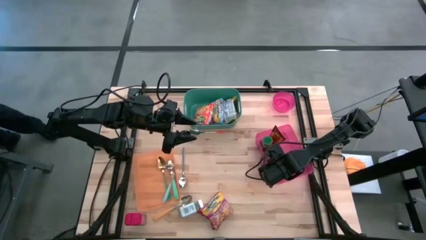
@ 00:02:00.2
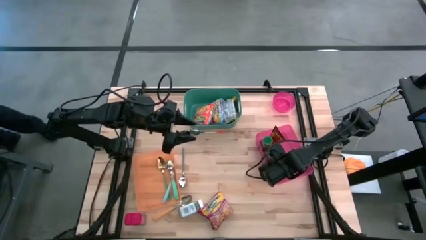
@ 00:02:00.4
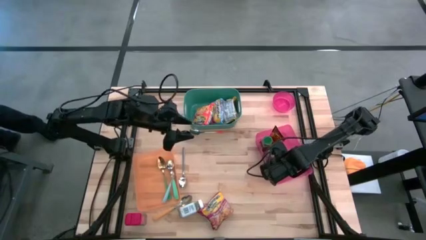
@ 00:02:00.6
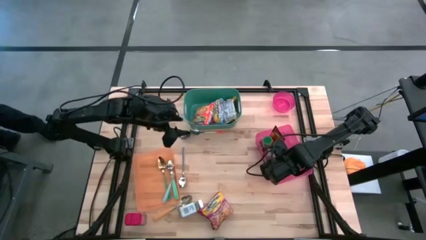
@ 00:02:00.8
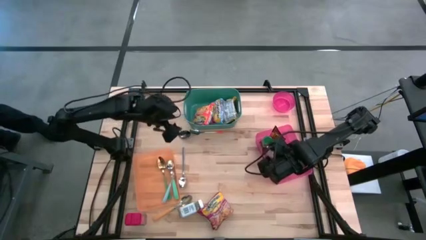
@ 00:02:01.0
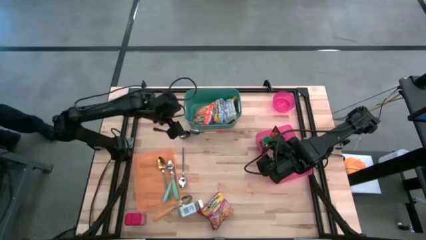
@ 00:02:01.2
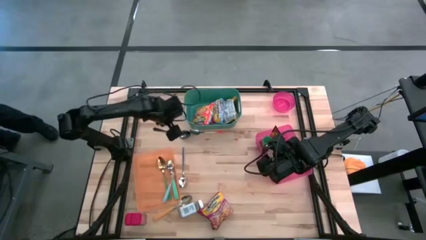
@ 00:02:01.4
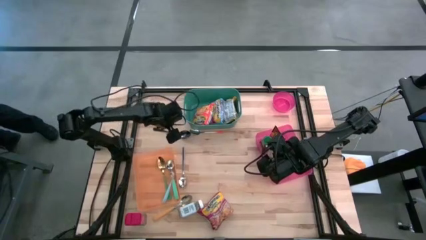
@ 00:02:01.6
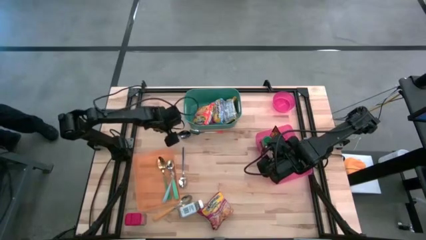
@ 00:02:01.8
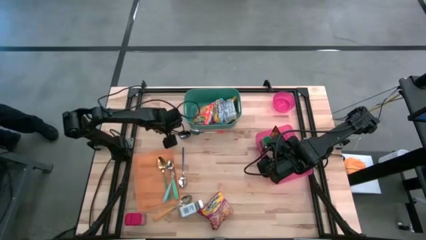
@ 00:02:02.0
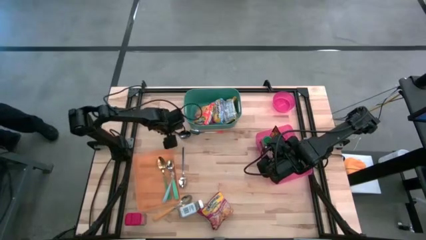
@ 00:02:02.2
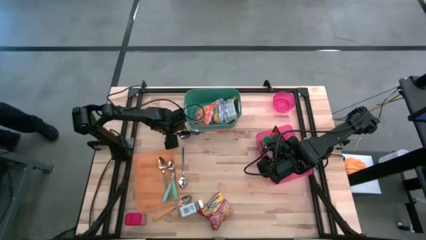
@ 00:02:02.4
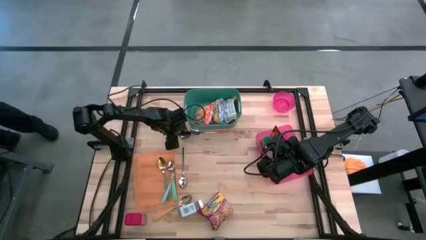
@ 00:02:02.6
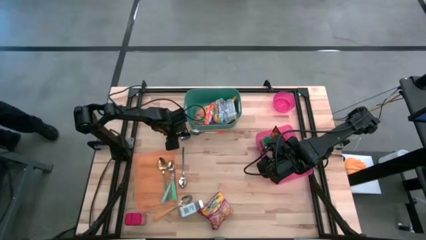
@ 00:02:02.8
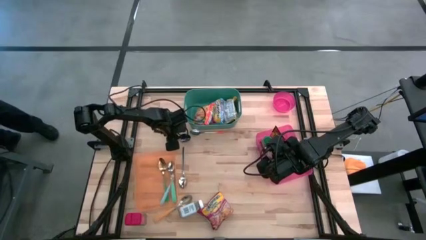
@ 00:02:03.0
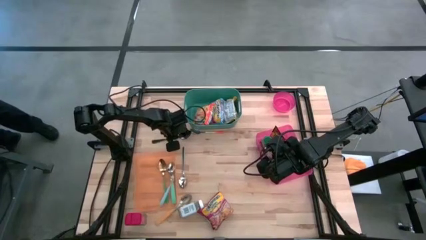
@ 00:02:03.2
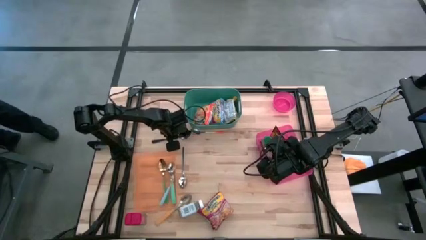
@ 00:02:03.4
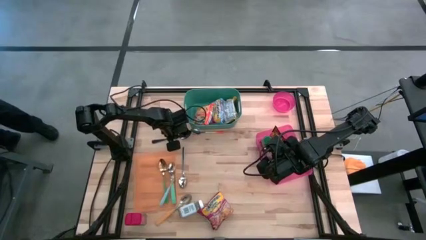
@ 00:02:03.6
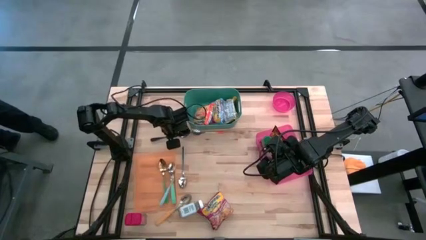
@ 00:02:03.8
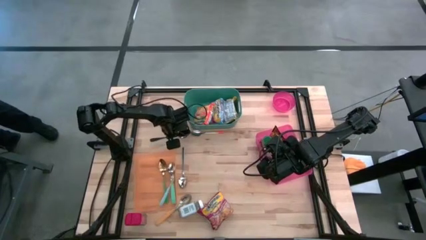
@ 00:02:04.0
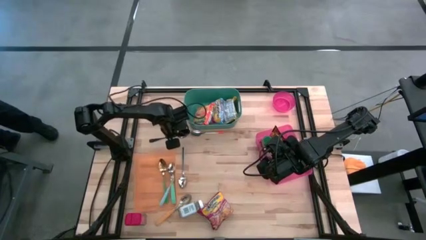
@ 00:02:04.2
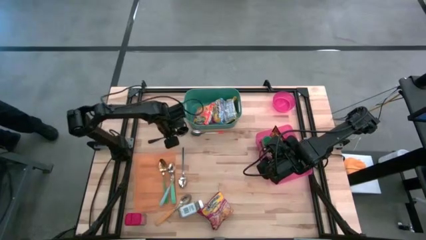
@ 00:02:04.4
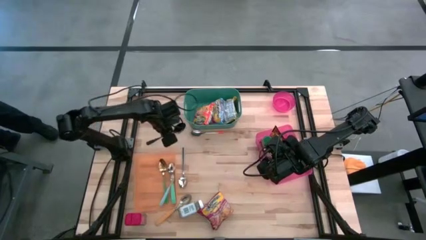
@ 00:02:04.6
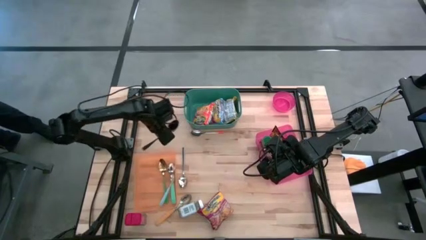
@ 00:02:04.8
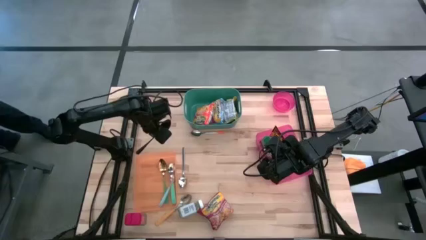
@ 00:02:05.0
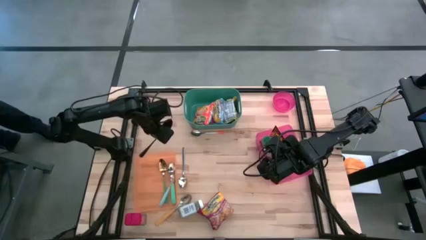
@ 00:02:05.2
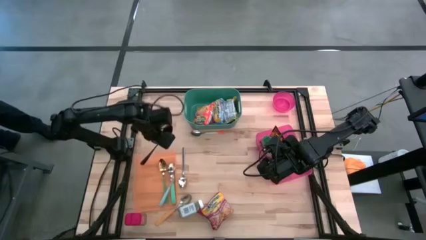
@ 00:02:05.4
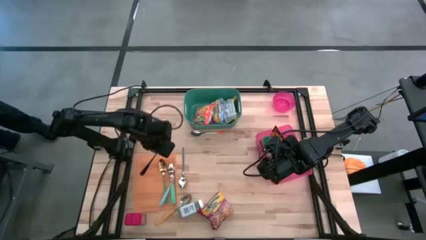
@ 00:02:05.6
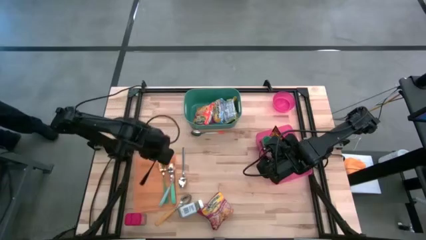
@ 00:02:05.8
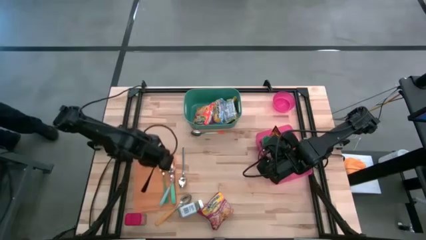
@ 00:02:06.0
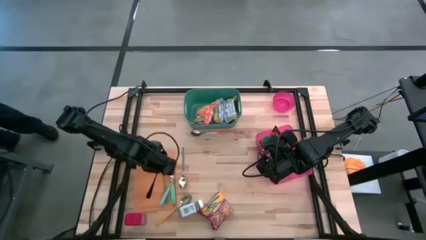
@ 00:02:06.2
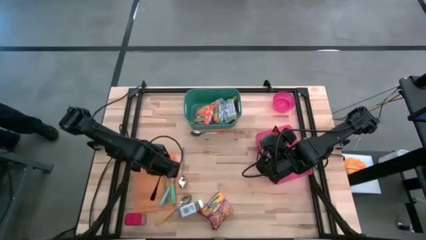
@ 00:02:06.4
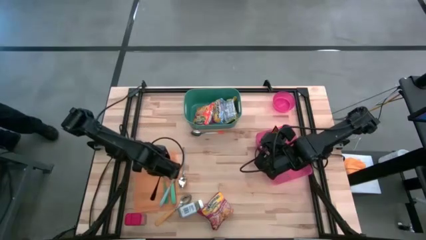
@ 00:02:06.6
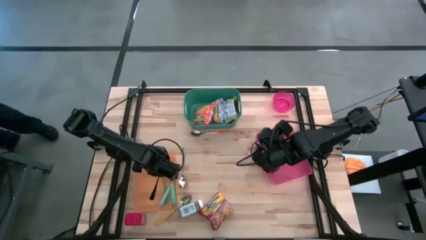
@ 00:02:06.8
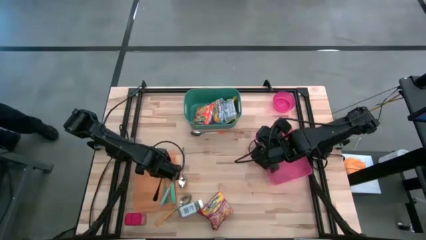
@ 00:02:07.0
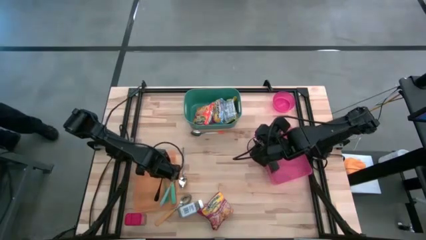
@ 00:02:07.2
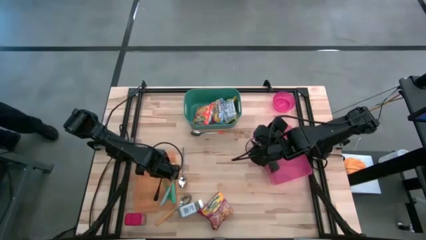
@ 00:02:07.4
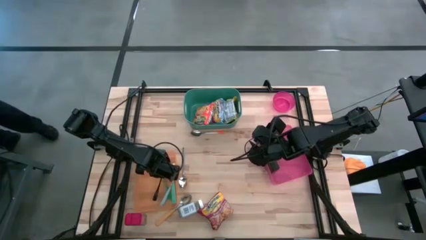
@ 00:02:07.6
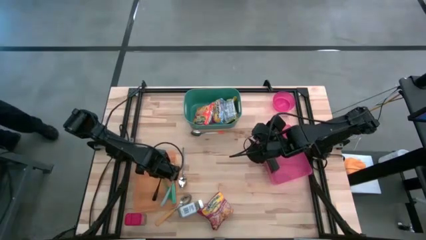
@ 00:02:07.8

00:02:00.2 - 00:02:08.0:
Put the black spoon into the orange bin

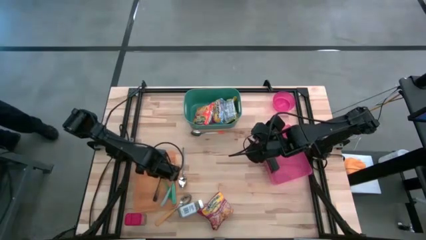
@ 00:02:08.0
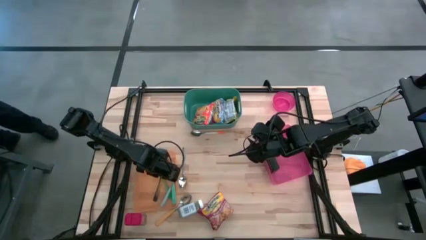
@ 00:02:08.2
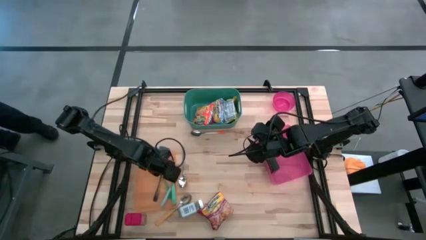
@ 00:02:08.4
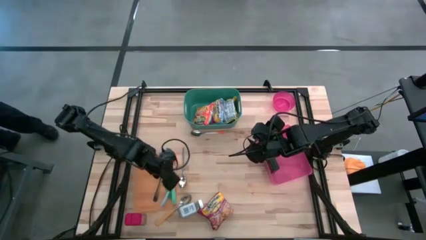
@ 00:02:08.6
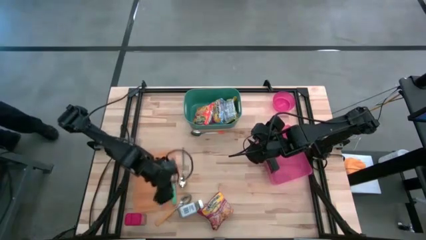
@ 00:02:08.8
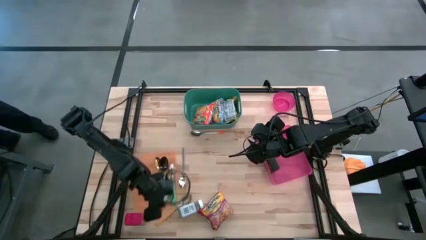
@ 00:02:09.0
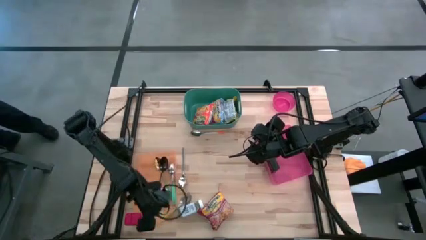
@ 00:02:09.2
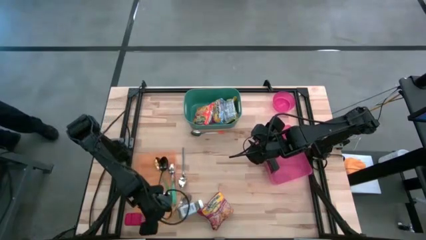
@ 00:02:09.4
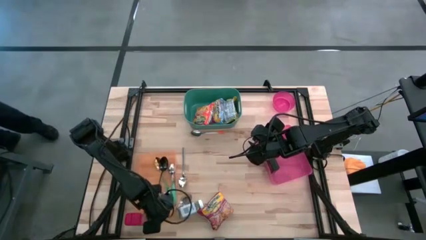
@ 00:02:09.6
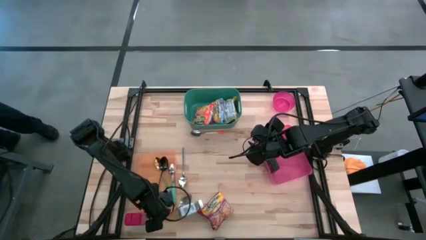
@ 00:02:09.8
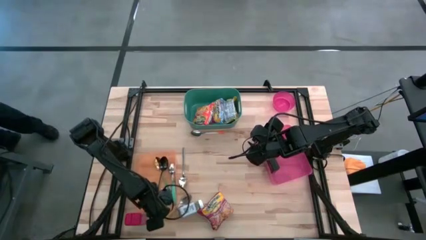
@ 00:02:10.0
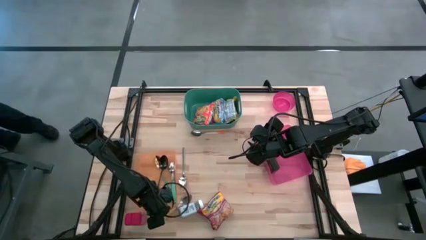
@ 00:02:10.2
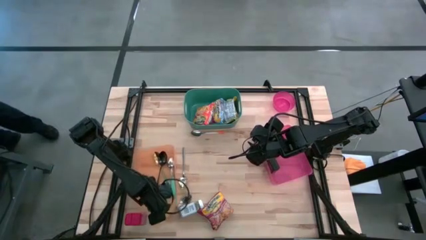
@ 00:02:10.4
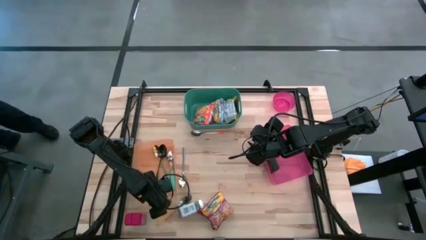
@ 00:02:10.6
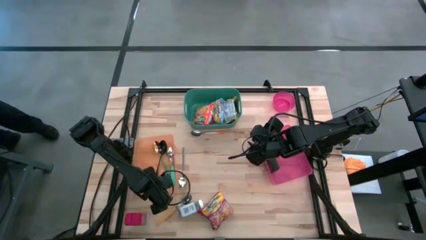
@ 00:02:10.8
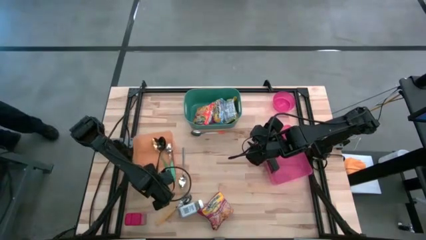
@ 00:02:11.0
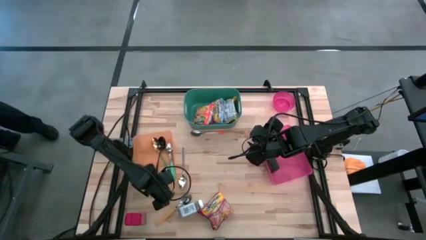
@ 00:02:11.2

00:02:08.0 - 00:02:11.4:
Adjust the orange bin

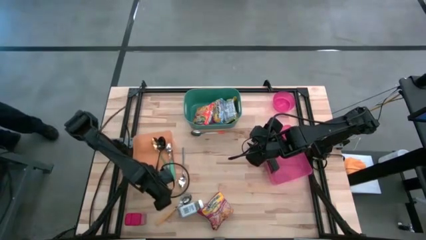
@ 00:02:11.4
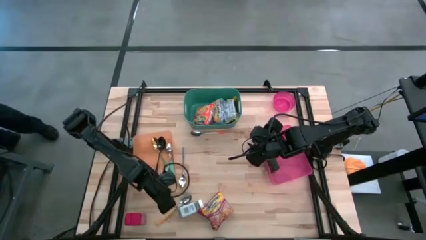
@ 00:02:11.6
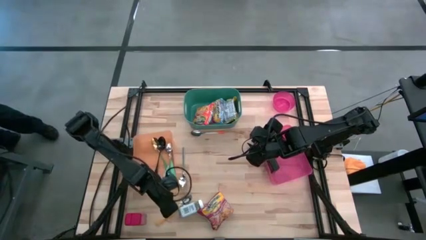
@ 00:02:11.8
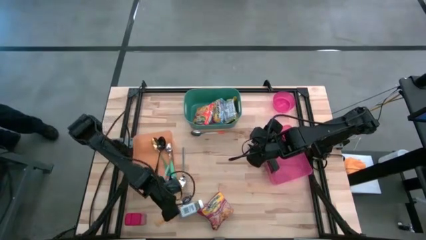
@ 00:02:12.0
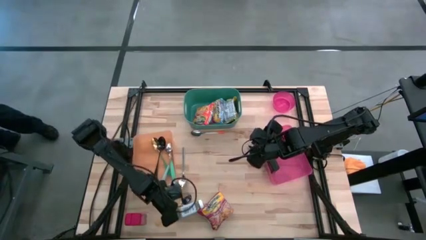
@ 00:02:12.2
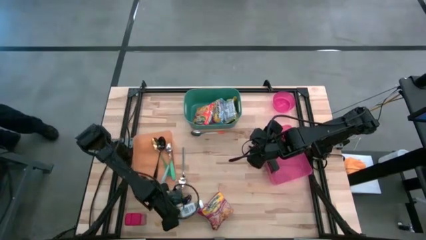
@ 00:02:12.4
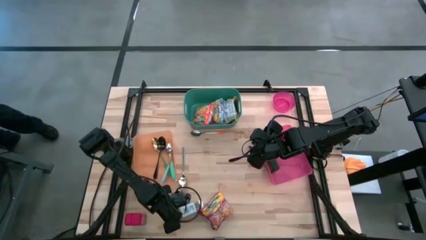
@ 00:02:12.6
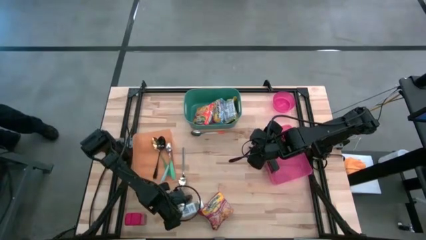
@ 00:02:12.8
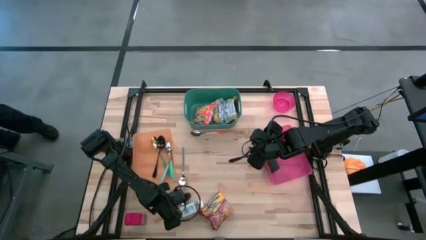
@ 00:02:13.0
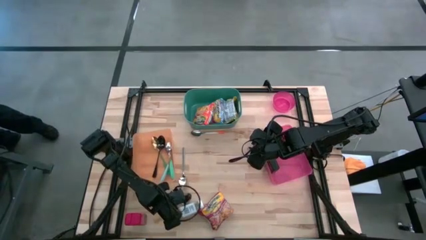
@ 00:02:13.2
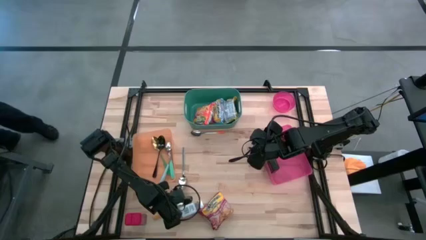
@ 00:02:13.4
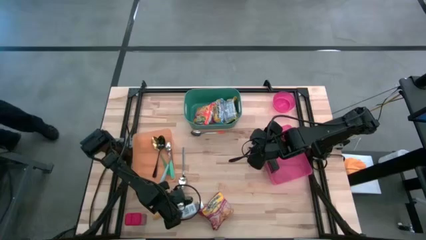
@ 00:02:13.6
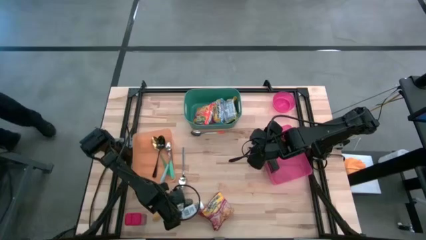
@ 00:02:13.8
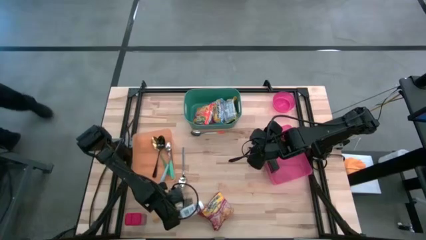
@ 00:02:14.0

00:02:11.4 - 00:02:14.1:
Put the light orange spoon into the orange bin
